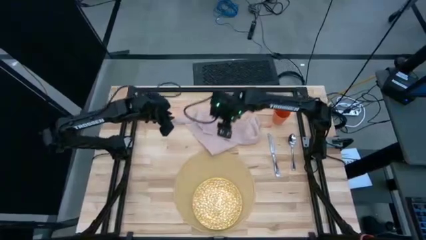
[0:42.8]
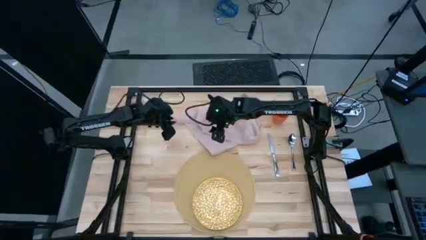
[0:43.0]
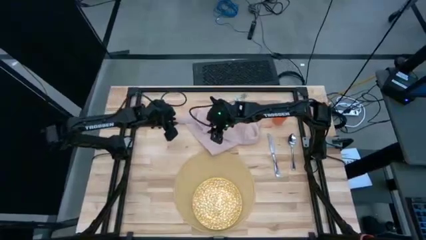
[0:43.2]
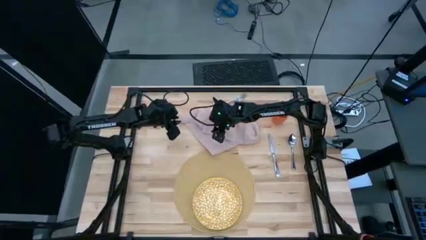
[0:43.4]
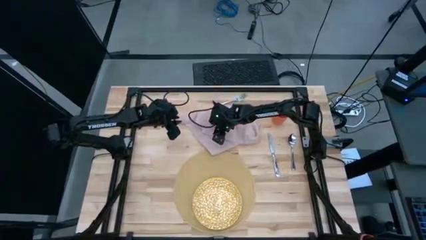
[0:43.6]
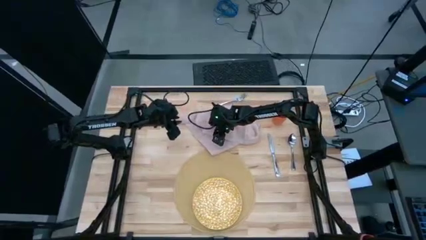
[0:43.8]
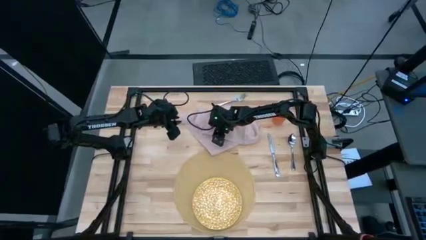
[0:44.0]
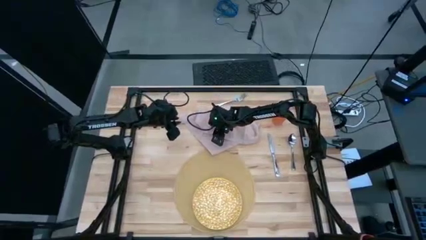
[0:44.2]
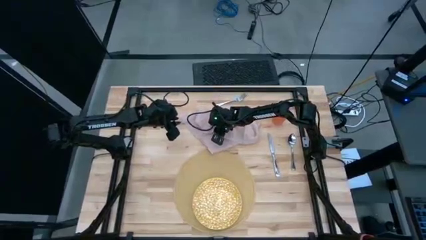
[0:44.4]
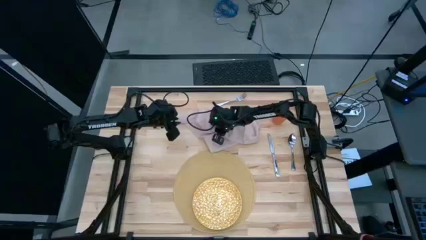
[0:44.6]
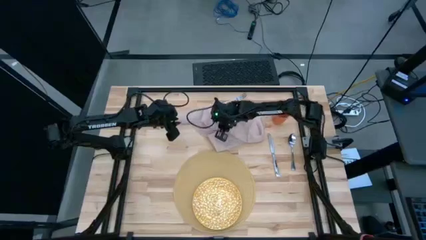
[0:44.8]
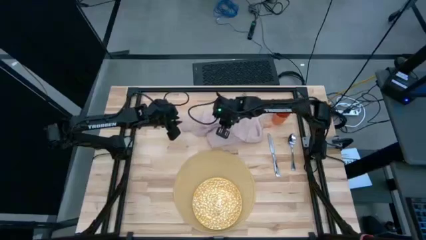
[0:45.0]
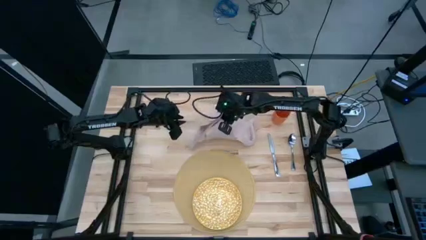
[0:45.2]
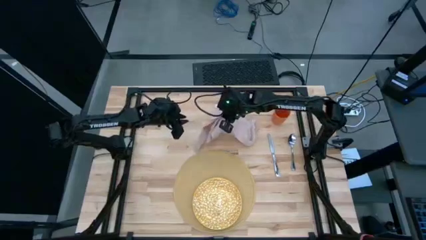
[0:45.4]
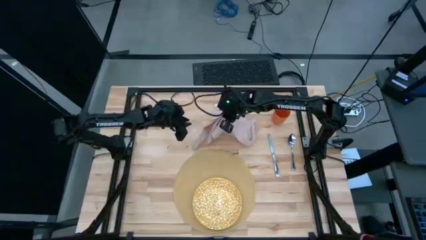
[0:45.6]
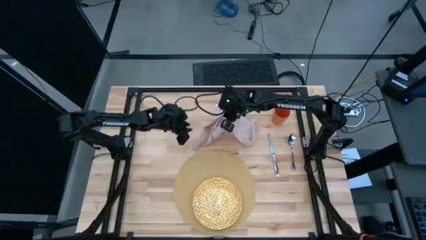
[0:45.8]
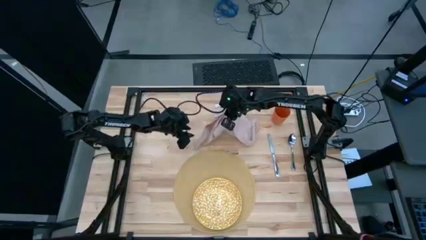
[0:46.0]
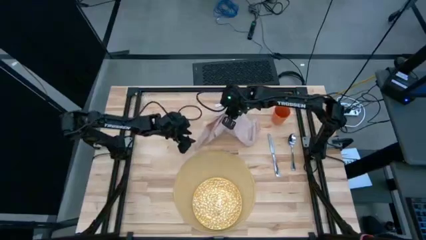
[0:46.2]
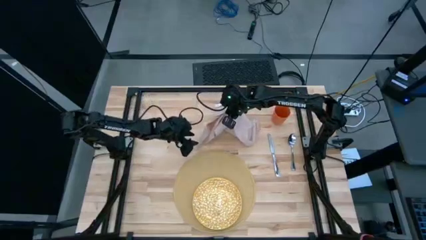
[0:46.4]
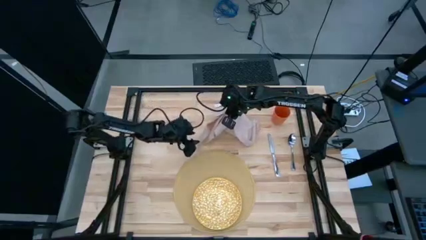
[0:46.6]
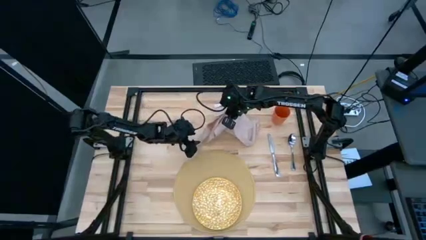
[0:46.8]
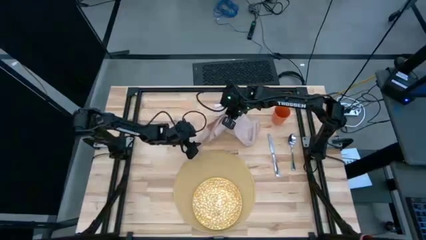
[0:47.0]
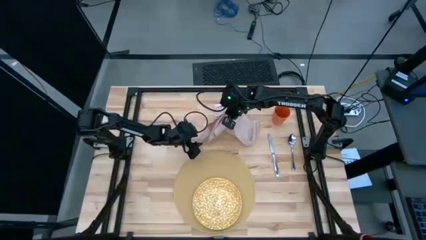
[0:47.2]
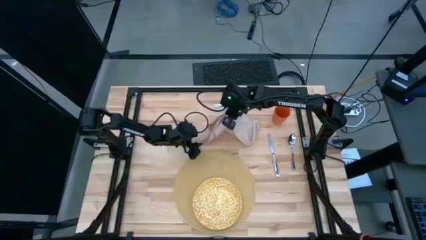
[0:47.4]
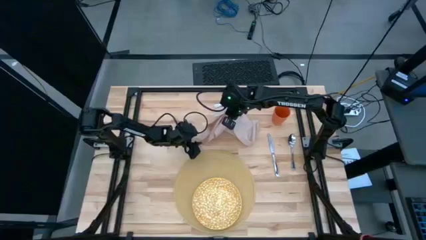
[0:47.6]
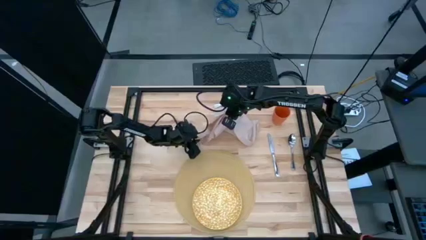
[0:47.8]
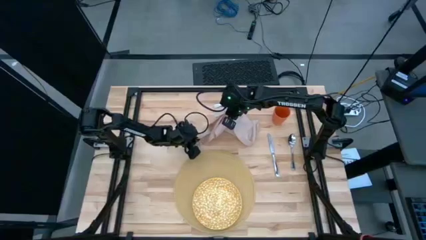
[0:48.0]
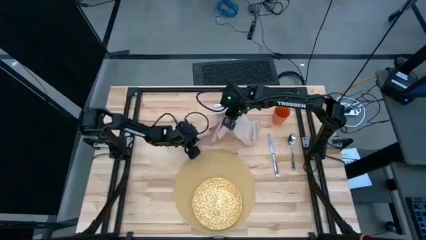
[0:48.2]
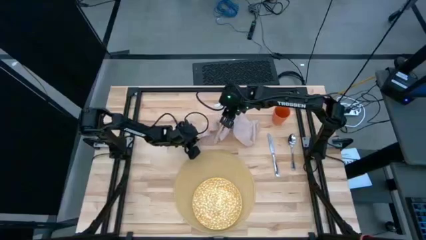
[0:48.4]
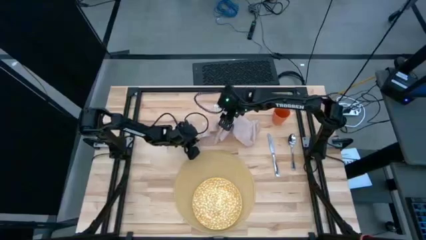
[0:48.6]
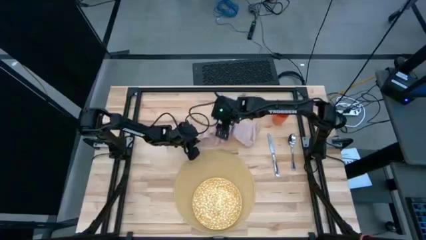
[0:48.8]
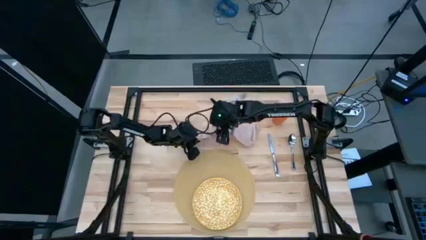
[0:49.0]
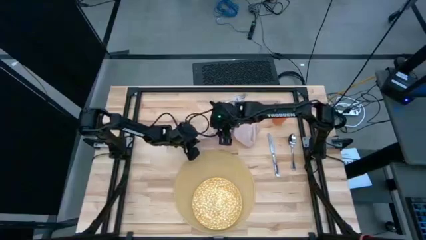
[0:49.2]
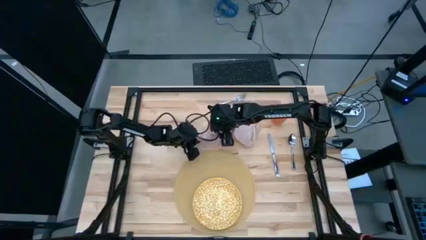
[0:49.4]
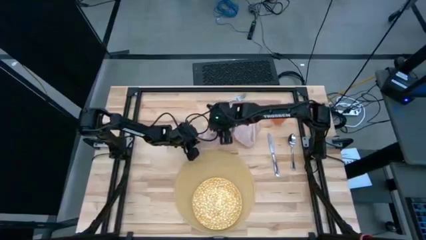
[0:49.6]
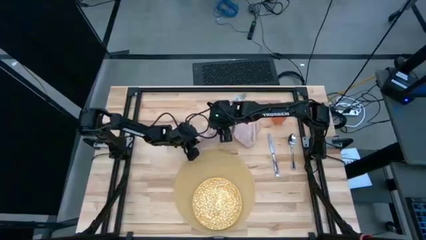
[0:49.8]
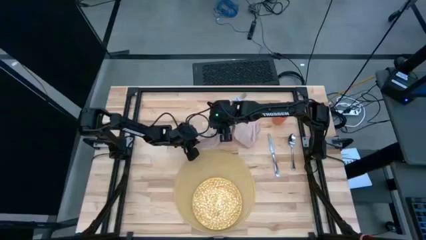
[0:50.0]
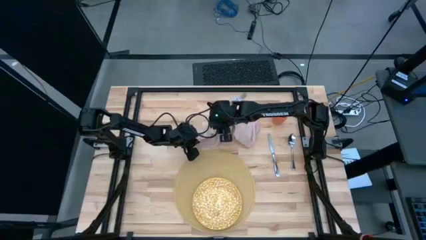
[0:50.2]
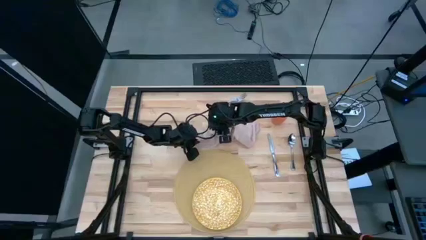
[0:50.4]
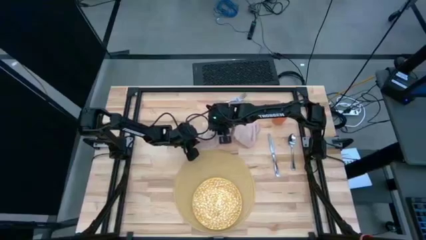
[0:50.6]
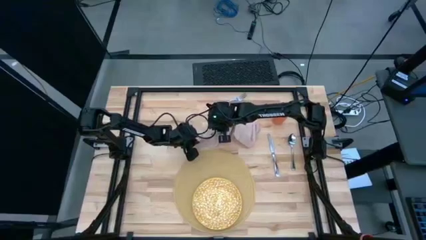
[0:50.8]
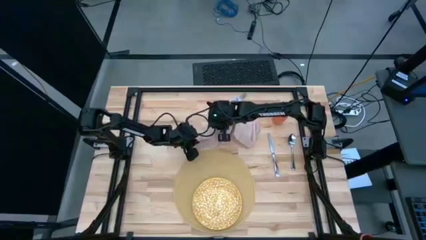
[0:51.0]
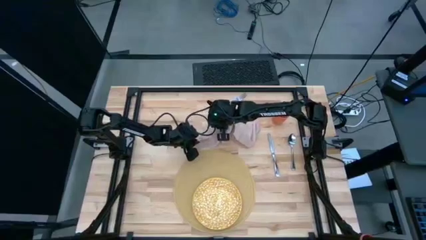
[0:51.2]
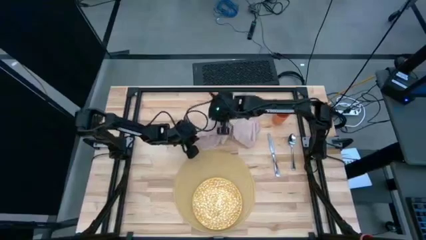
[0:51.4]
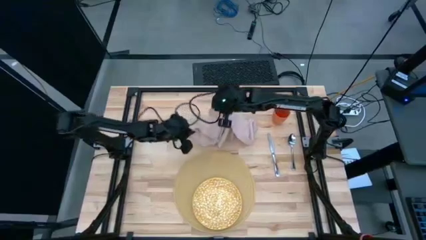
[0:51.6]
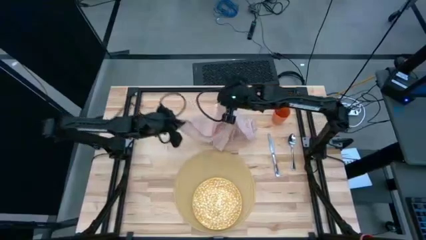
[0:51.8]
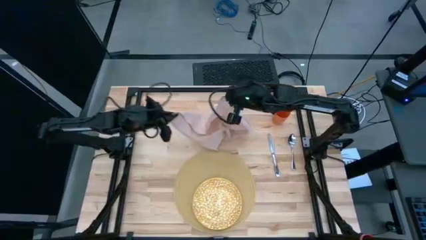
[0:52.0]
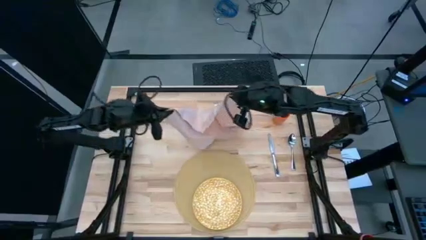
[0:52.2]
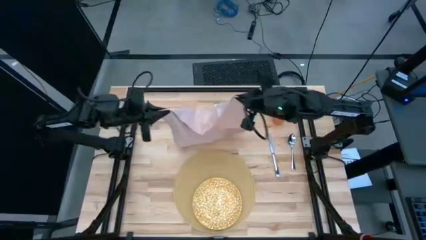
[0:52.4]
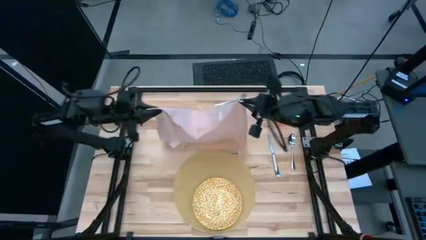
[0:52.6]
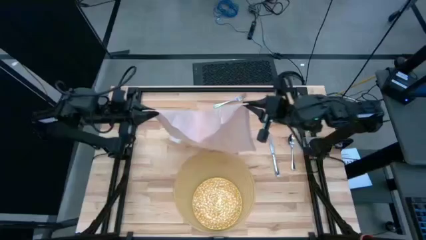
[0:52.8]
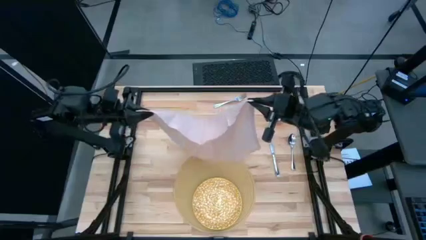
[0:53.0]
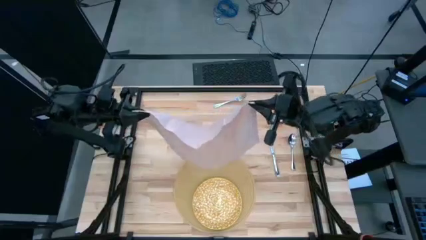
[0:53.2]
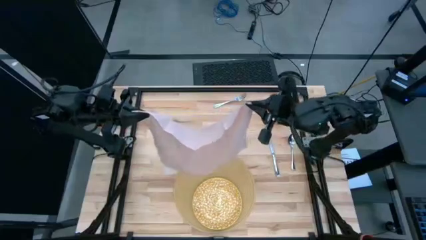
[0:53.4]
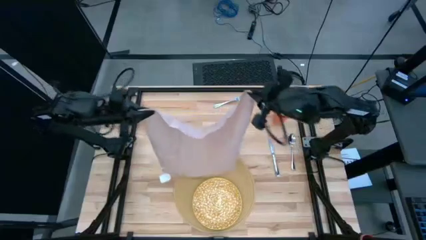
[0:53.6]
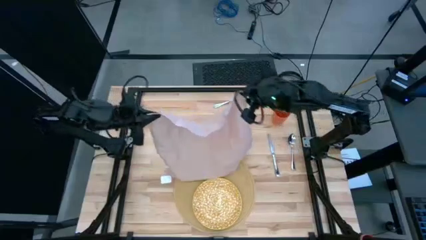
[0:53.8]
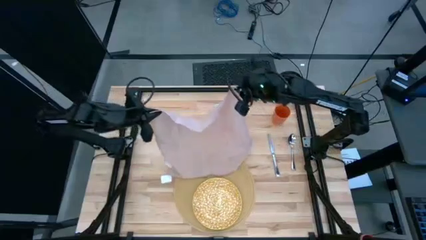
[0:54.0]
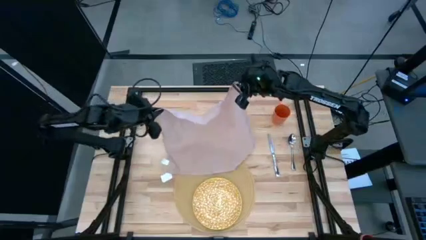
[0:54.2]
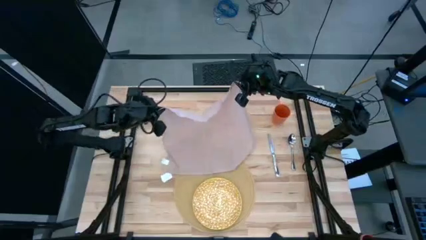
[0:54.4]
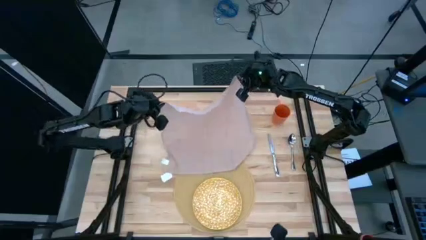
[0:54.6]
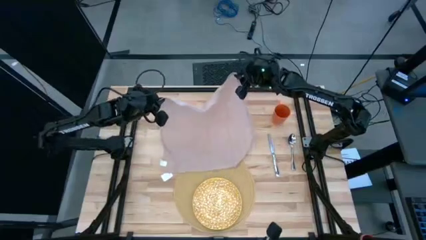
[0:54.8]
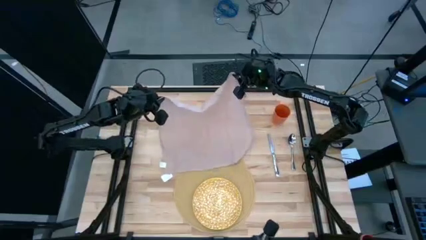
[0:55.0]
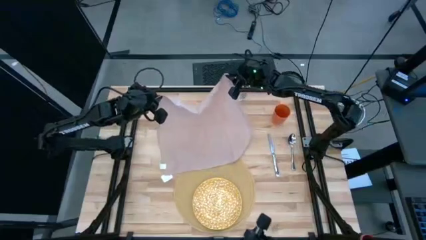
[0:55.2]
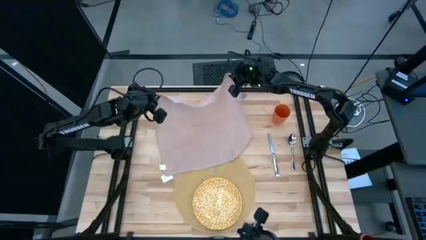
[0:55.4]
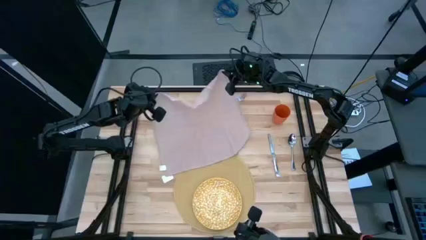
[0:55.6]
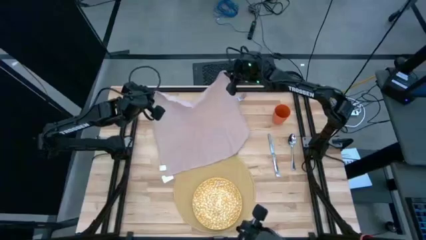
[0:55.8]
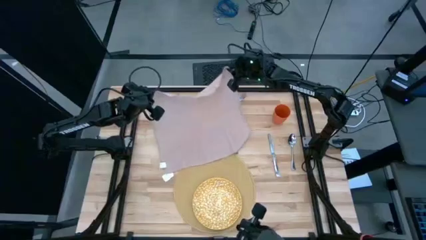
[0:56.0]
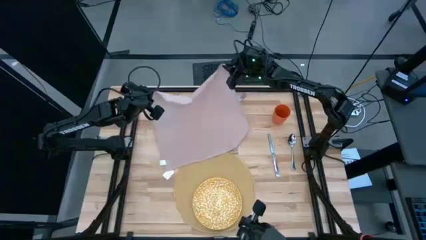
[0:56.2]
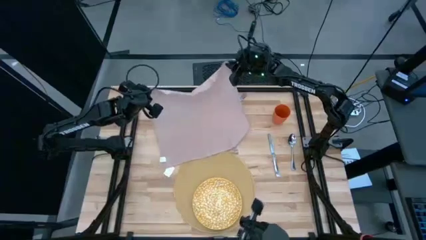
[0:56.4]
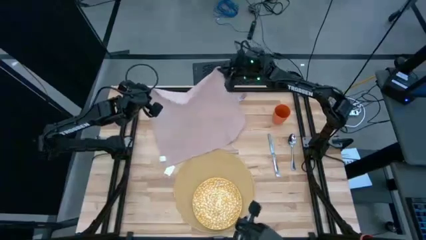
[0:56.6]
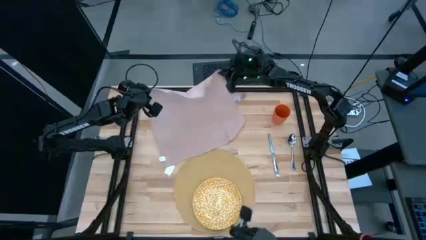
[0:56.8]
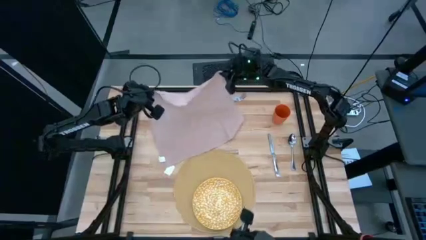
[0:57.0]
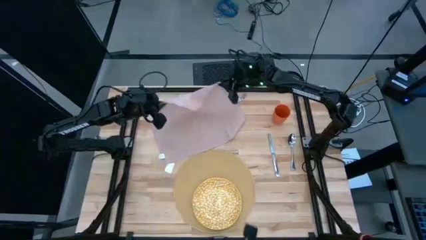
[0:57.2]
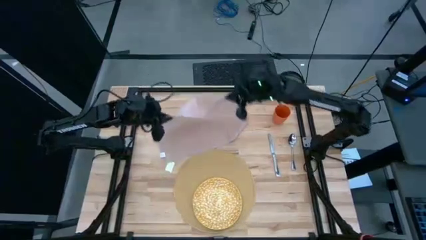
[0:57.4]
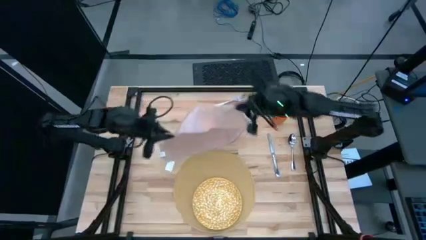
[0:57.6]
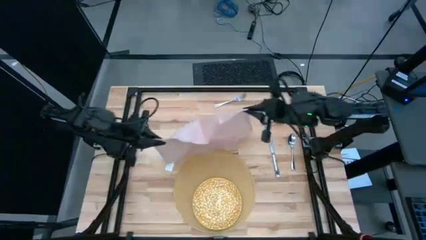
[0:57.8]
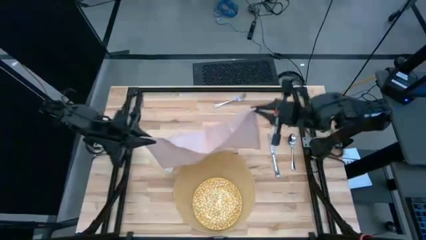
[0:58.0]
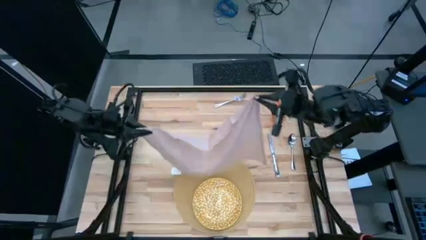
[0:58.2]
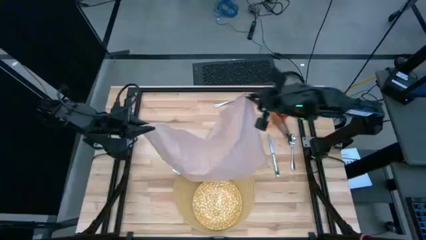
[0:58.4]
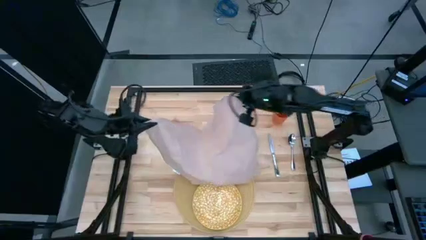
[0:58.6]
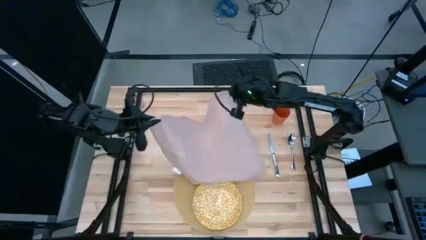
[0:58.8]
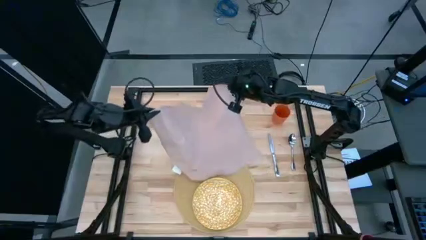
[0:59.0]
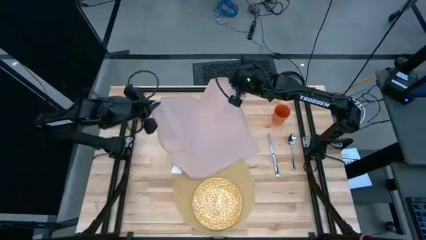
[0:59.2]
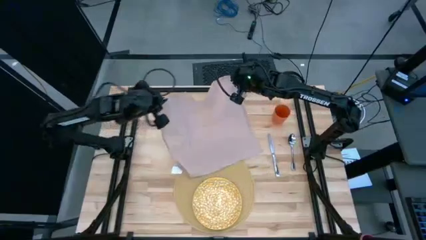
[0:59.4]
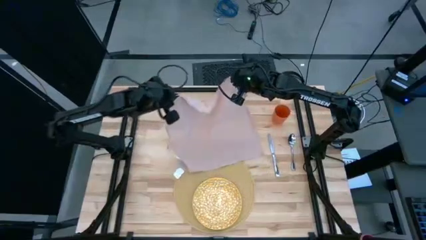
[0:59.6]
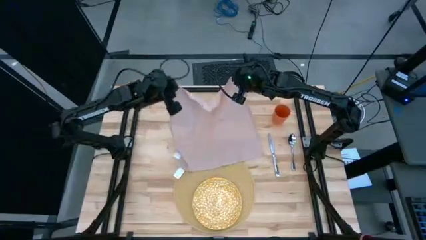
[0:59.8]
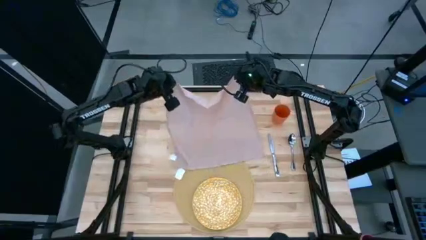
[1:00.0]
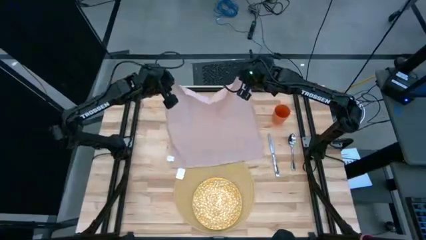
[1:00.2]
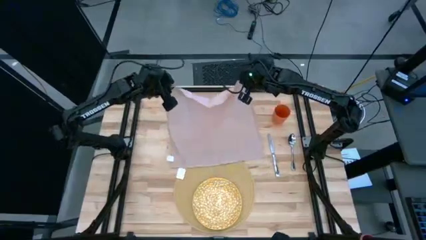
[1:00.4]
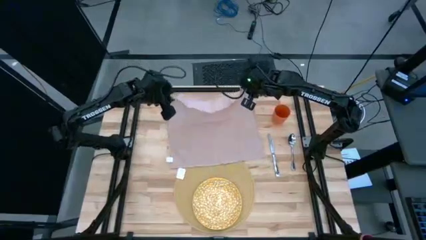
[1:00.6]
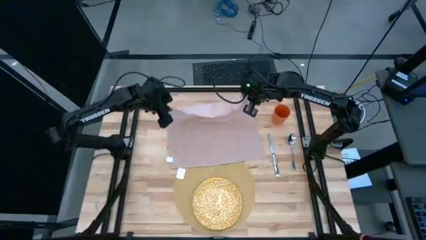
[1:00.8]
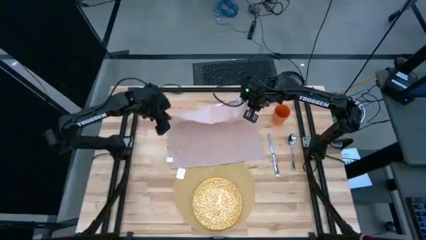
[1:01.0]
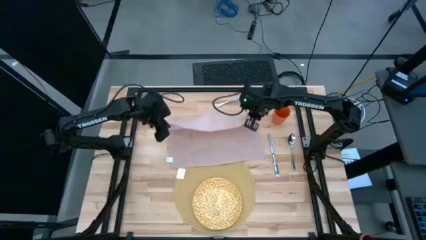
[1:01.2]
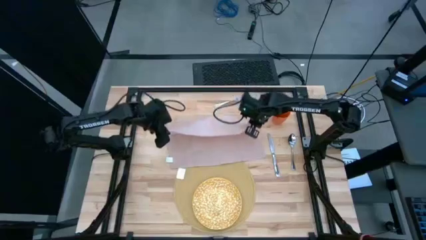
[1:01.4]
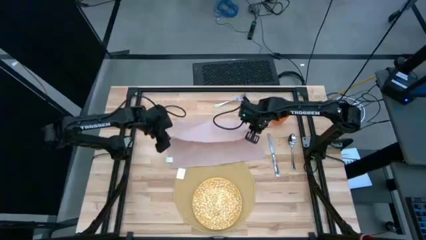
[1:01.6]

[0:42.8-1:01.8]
Task: Set table place
Fold the brown table napkin
